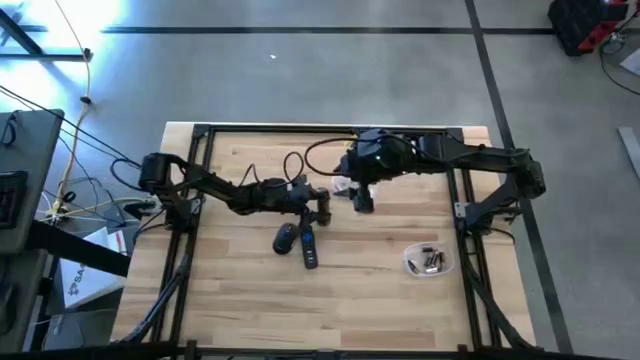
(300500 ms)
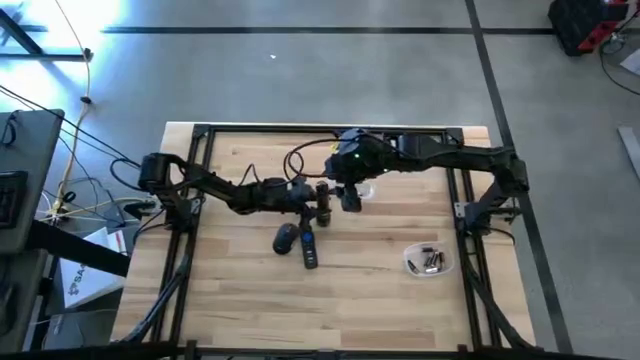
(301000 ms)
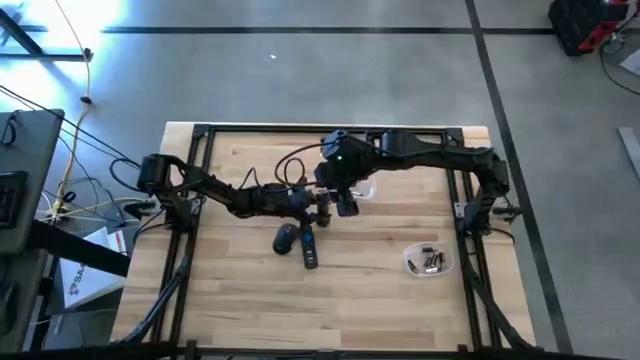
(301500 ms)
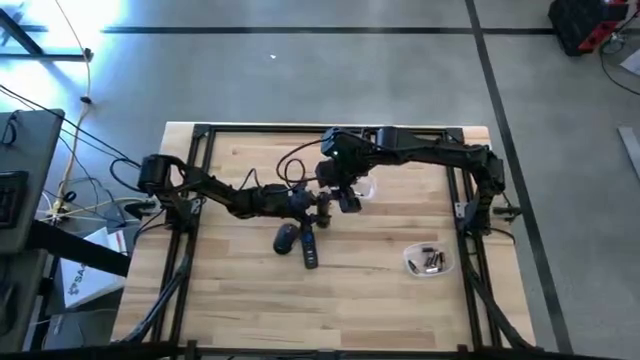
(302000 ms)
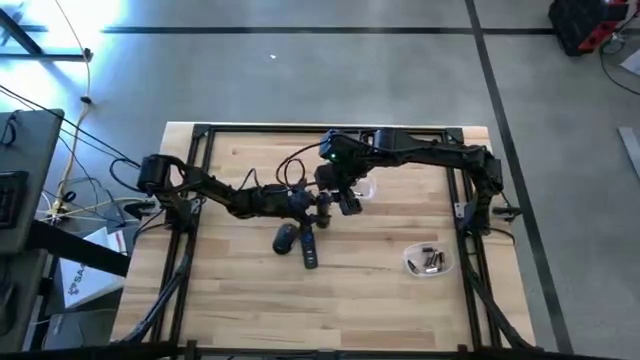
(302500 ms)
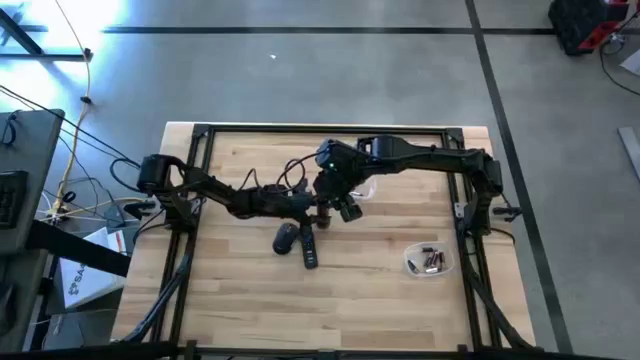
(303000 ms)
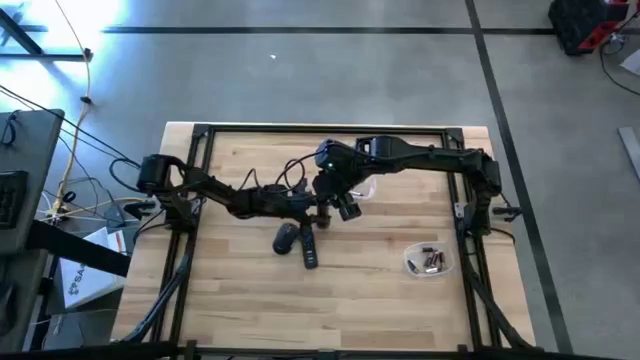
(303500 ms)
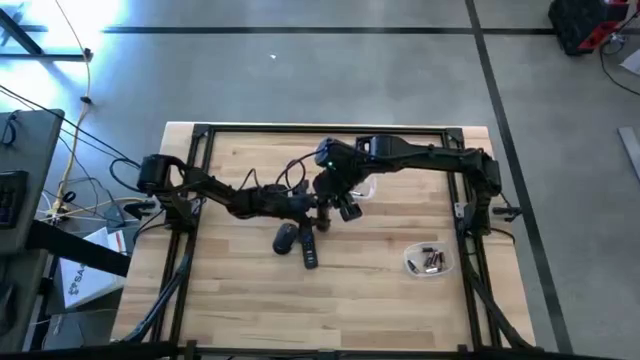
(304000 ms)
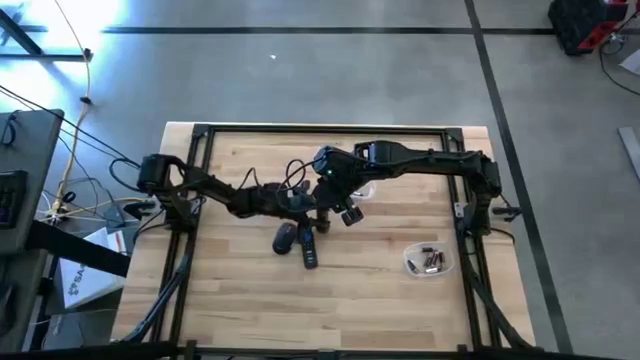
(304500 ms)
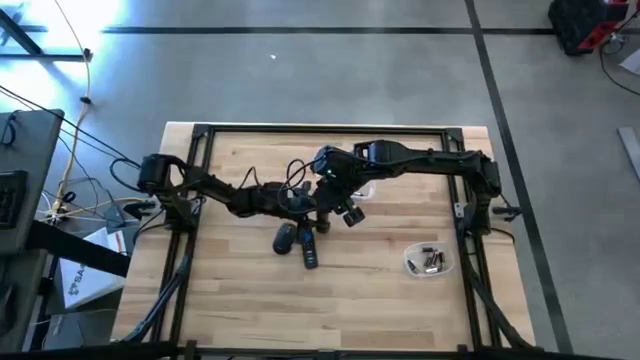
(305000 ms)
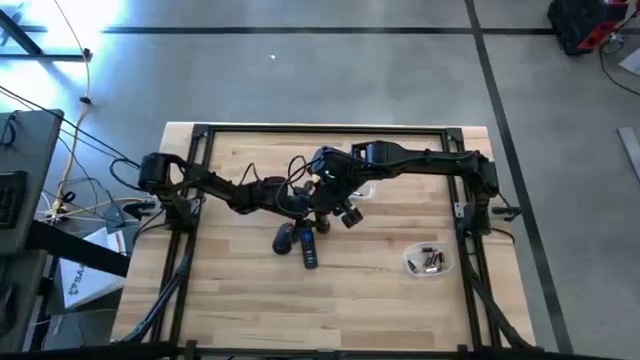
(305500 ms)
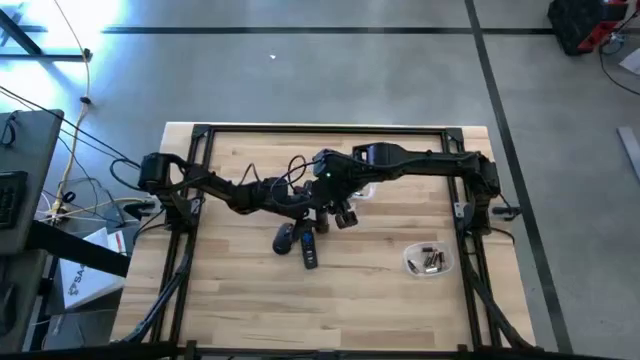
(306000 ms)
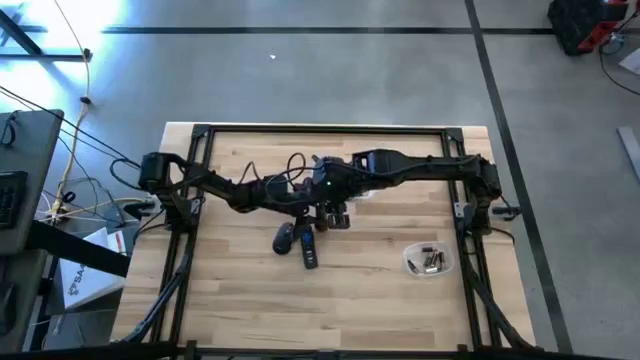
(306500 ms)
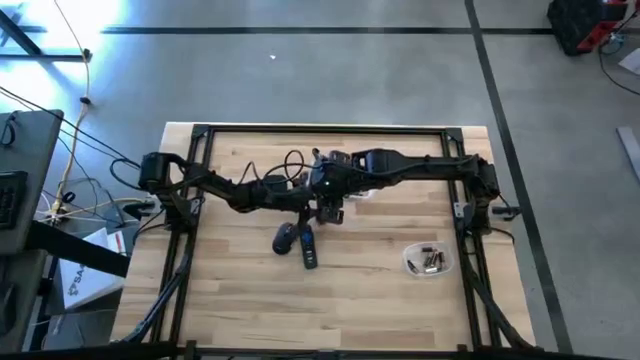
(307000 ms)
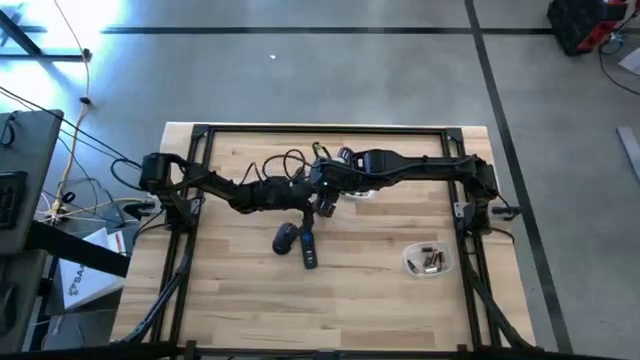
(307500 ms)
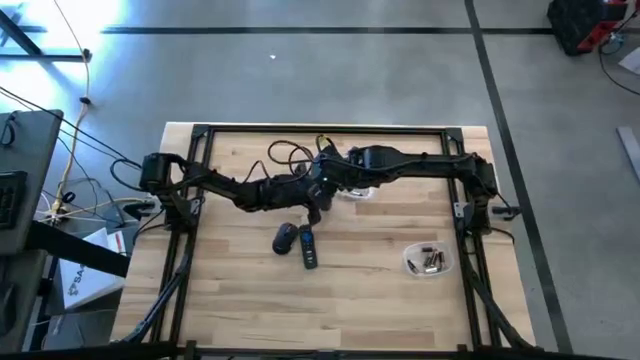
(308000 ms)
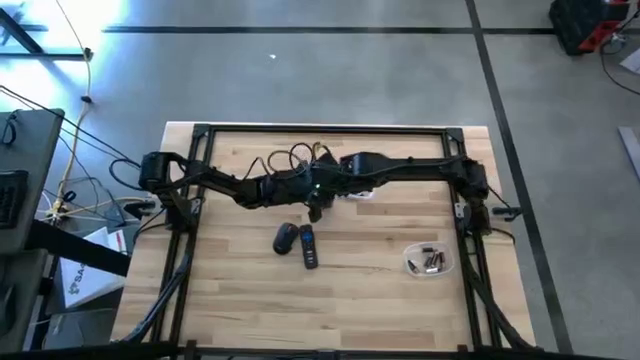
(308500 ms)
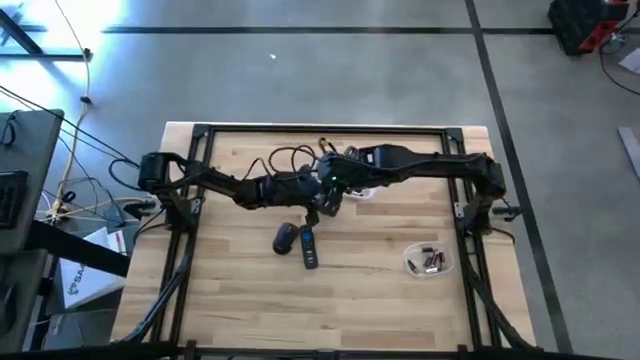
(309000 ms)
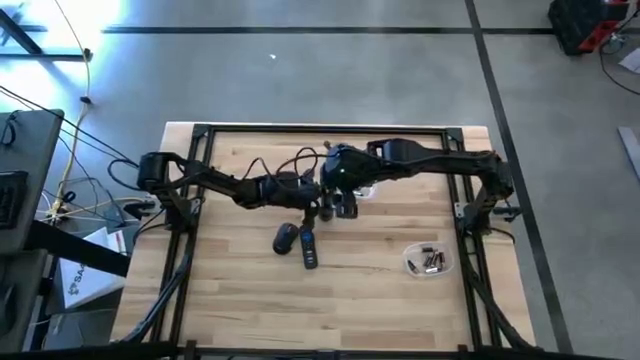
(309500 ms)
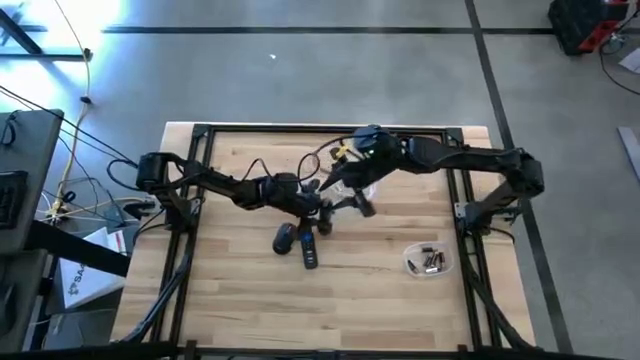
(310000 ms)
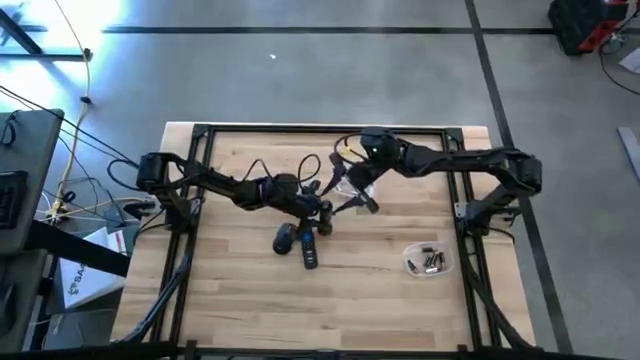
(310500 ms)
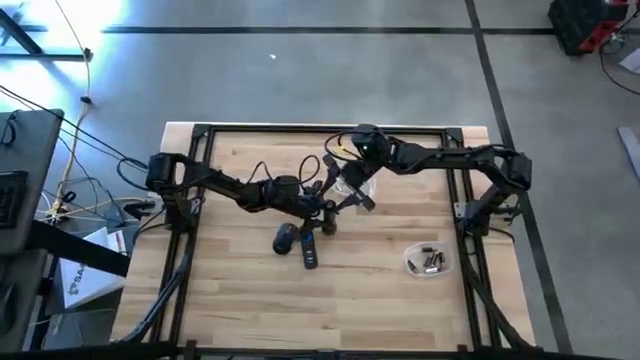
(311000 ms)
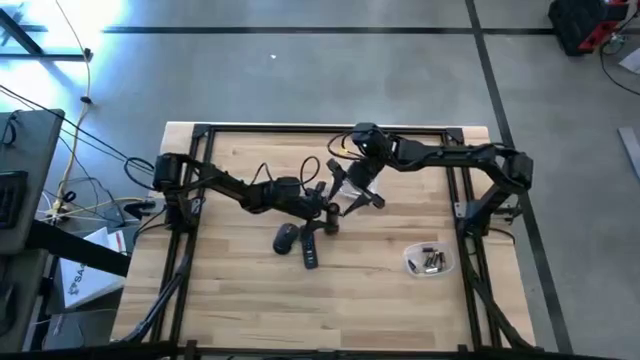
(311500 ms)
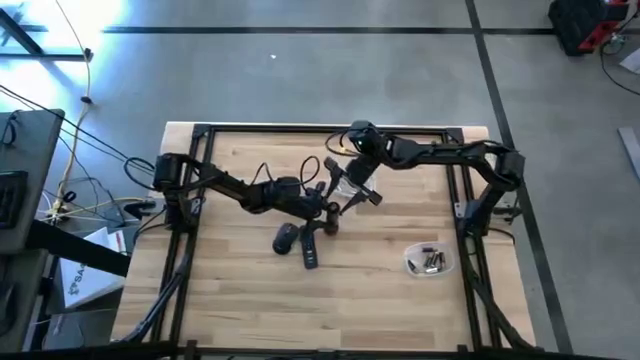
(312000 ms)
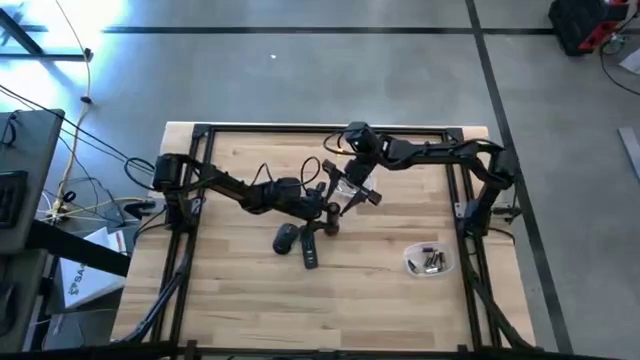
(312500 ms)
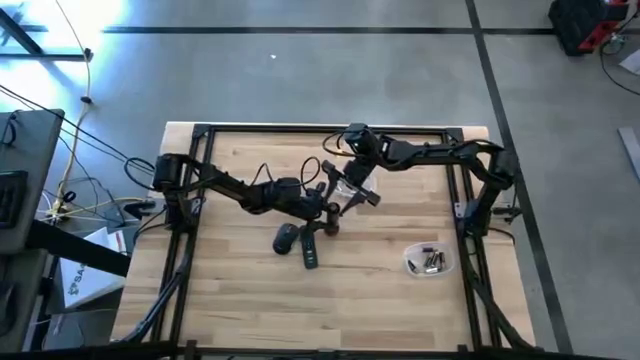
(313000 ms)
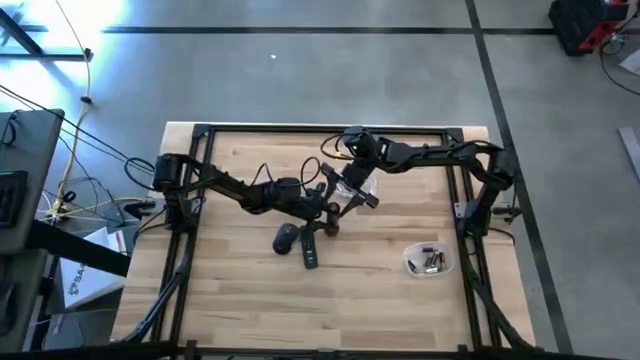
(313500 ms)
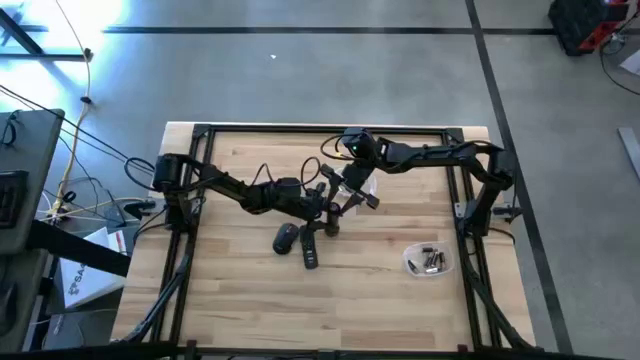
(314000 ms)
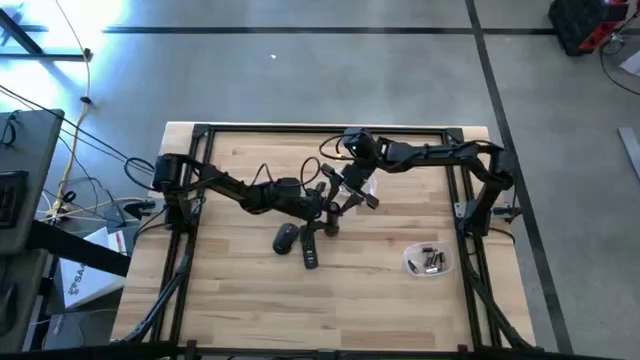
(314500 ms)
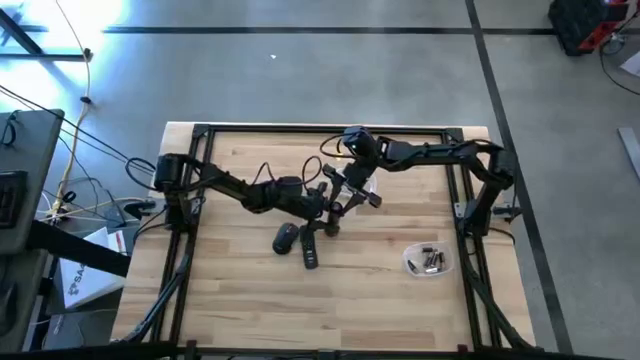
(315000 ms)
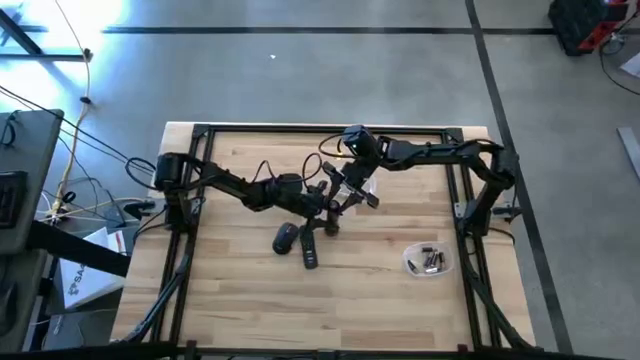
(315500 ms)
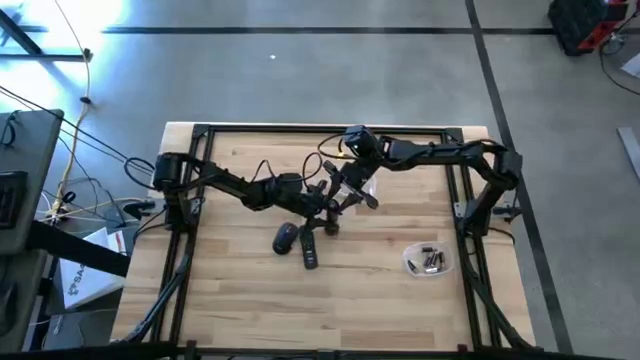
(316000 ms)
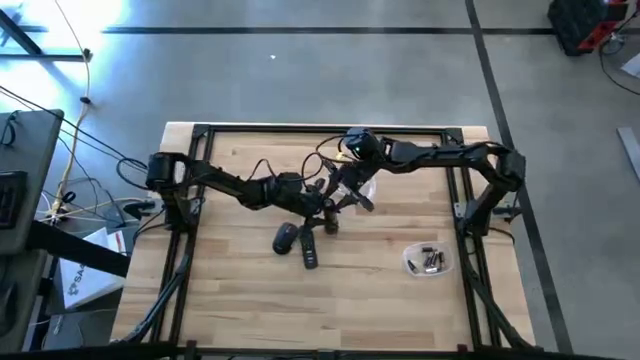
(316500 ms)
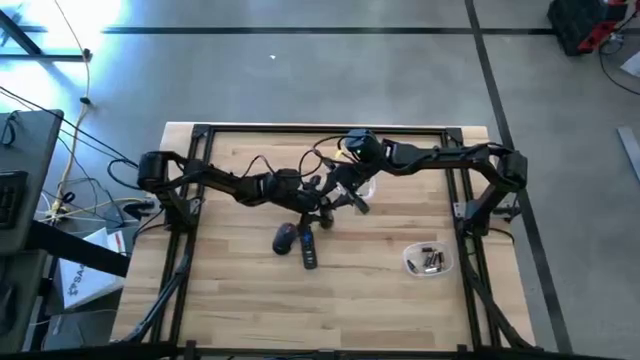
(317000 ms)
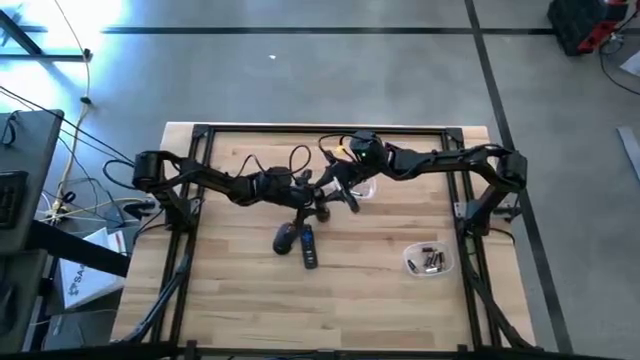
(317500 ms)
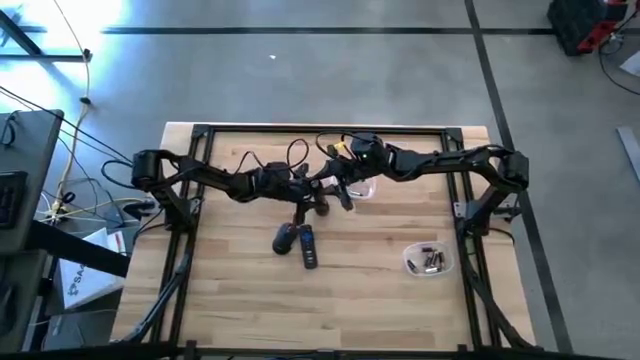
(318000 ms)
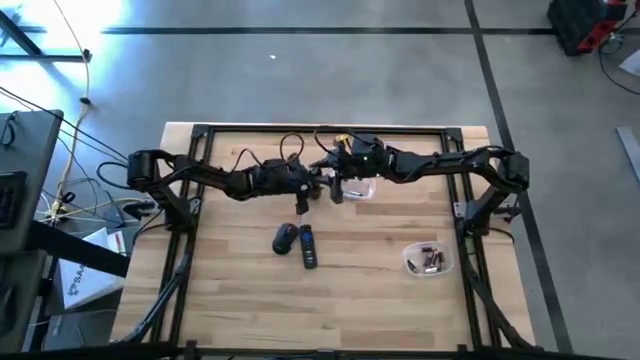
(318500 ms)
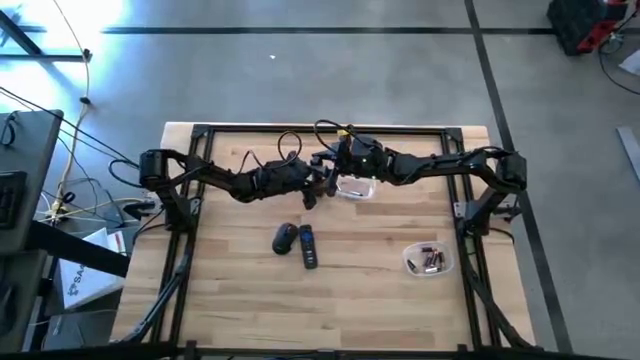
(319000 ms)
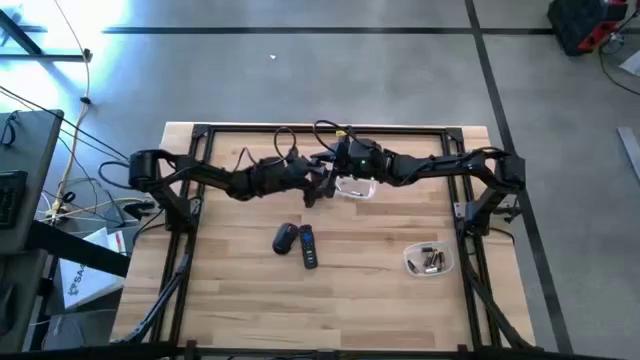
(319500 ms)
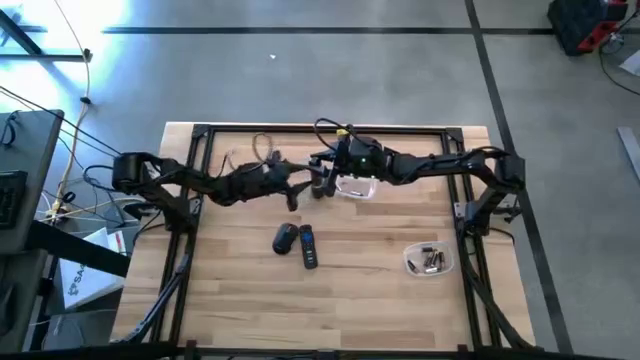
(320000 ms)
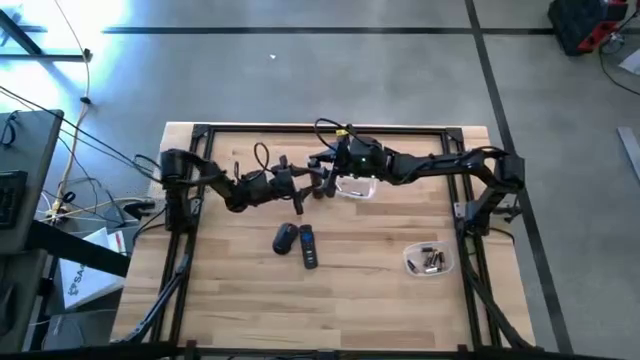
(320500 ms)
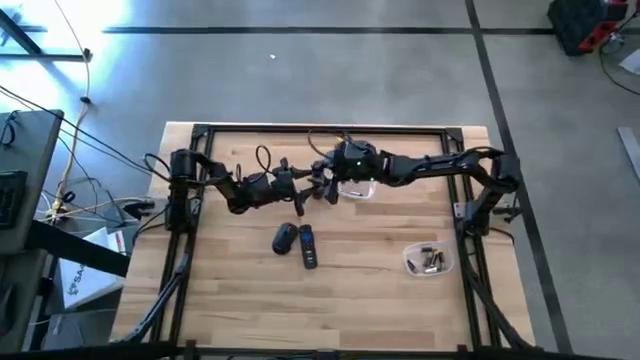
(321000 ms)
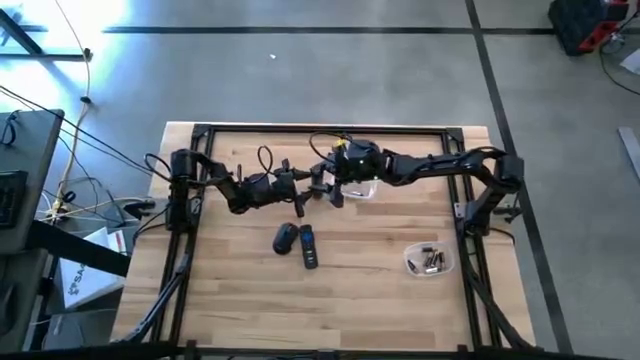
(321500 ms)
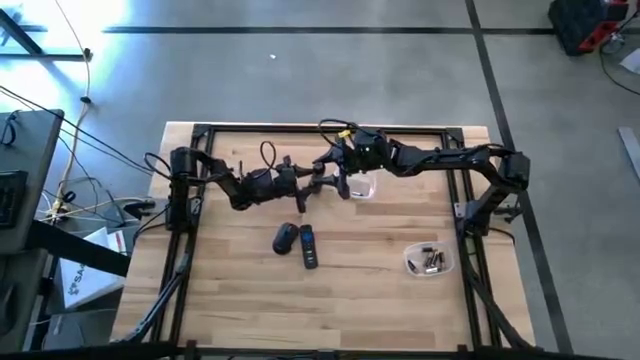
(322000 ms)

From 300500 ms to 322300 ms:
Task: Insert battery
Close the flashlight battery compartment
